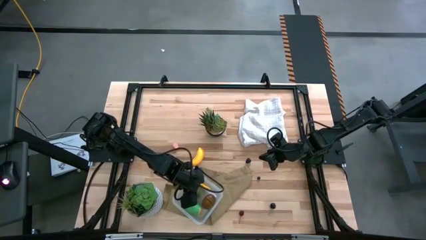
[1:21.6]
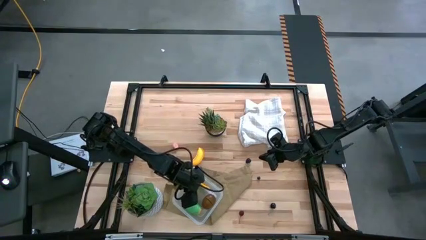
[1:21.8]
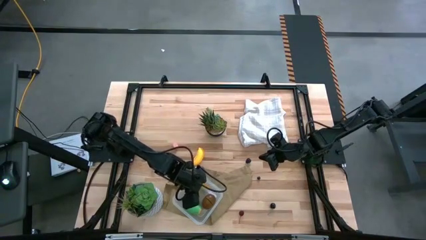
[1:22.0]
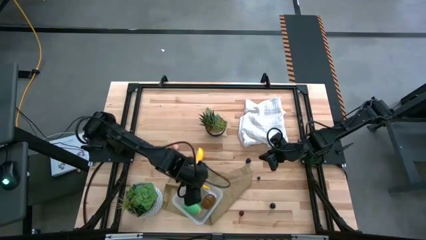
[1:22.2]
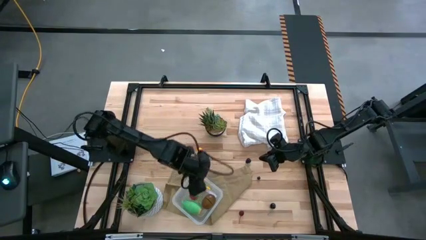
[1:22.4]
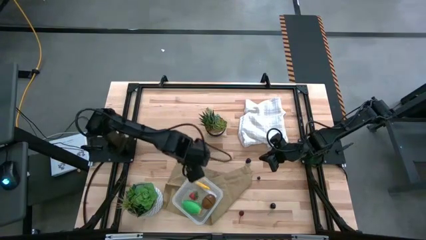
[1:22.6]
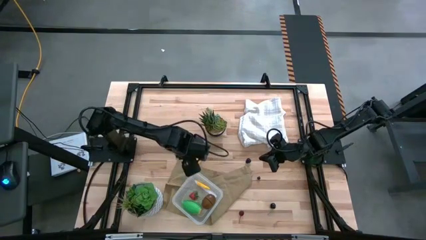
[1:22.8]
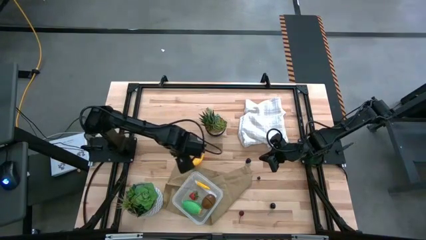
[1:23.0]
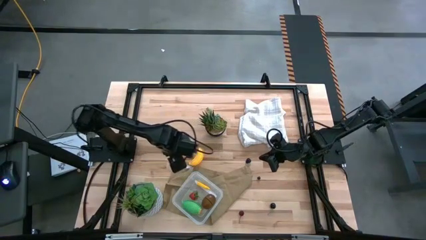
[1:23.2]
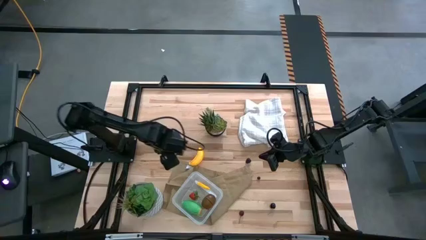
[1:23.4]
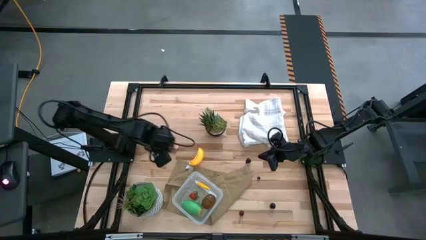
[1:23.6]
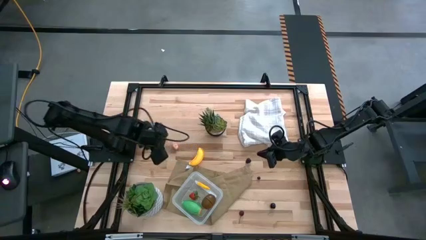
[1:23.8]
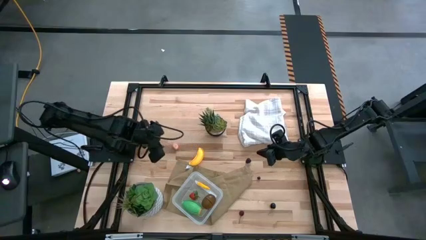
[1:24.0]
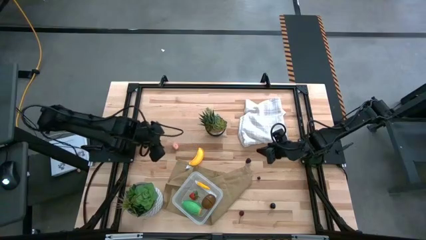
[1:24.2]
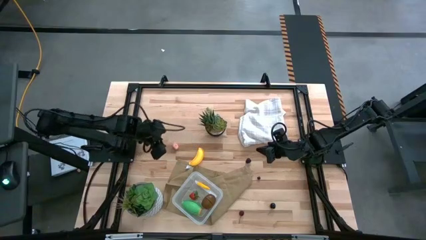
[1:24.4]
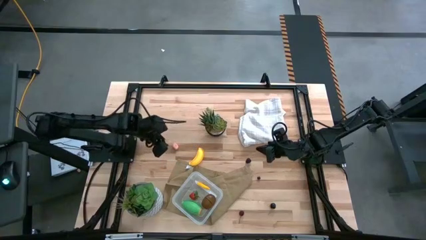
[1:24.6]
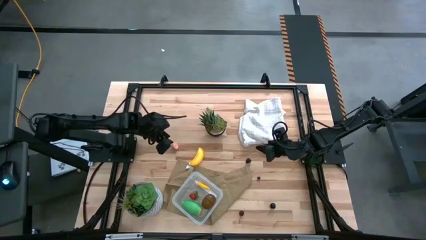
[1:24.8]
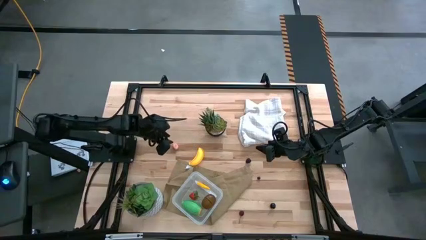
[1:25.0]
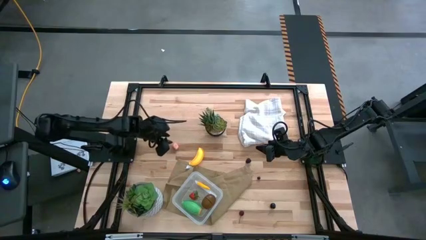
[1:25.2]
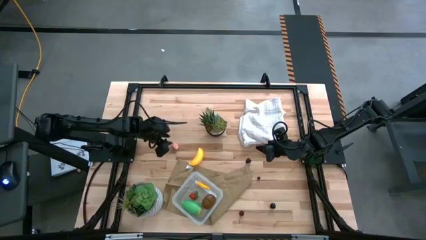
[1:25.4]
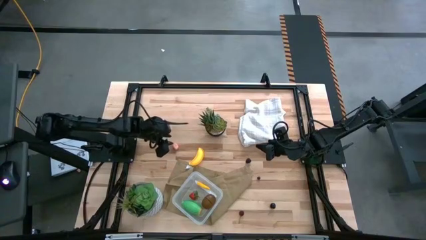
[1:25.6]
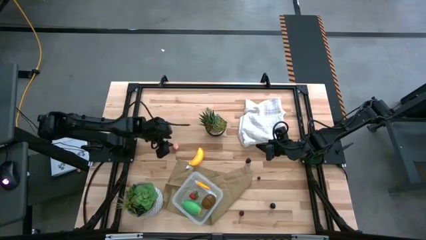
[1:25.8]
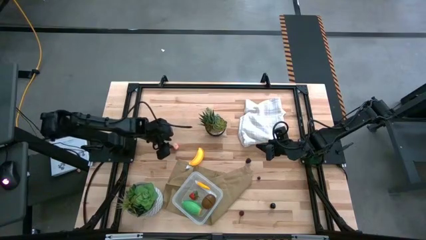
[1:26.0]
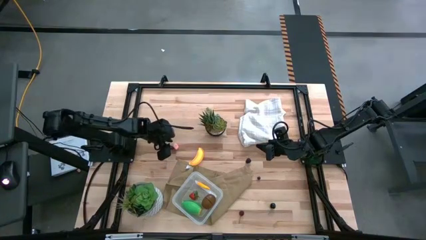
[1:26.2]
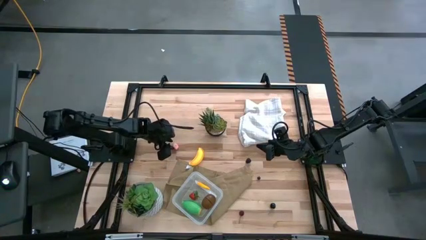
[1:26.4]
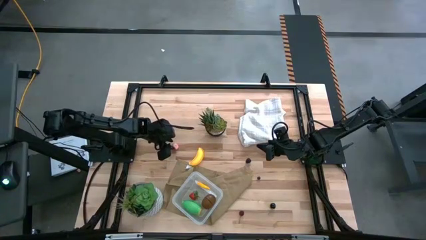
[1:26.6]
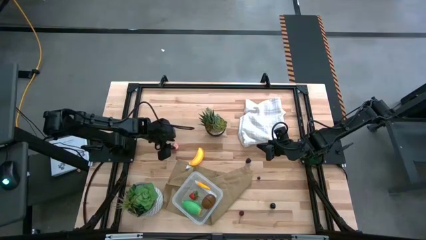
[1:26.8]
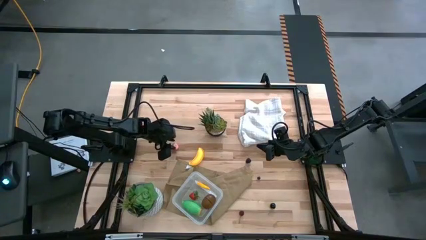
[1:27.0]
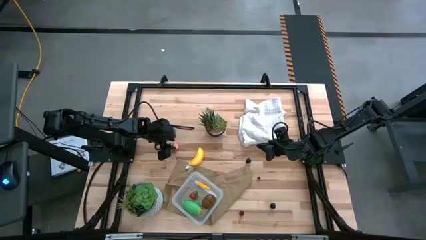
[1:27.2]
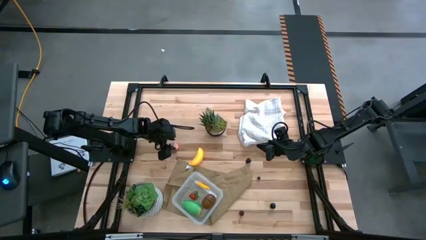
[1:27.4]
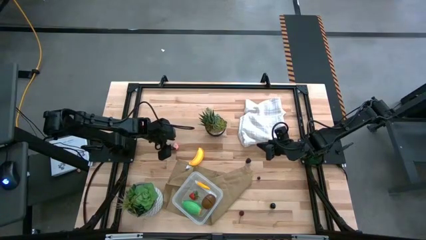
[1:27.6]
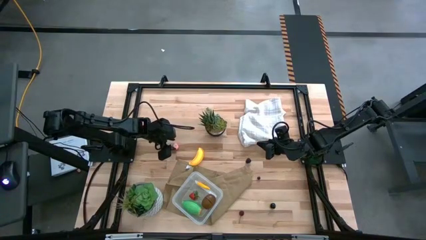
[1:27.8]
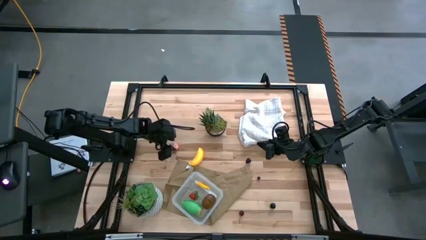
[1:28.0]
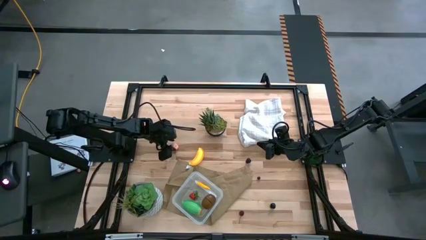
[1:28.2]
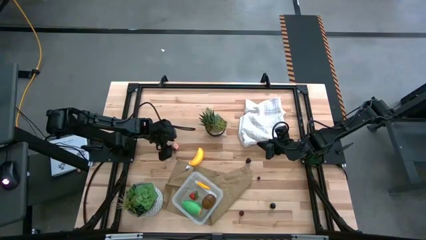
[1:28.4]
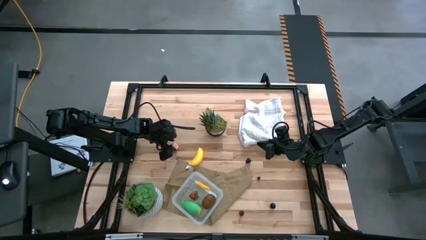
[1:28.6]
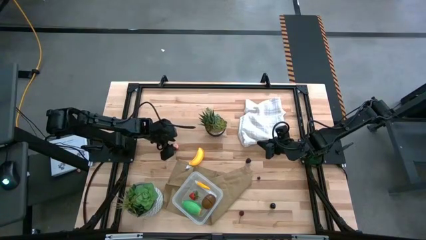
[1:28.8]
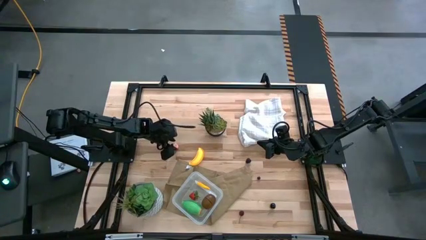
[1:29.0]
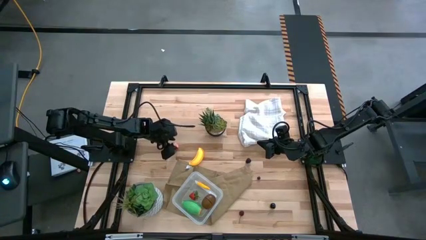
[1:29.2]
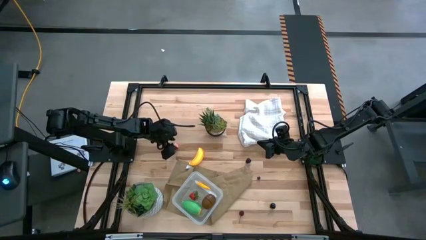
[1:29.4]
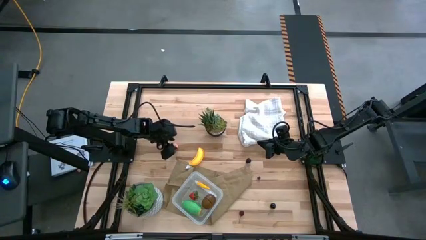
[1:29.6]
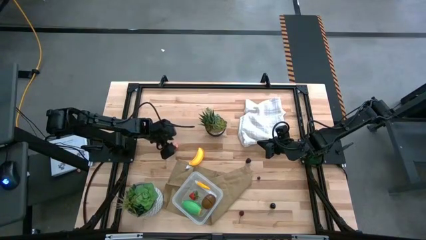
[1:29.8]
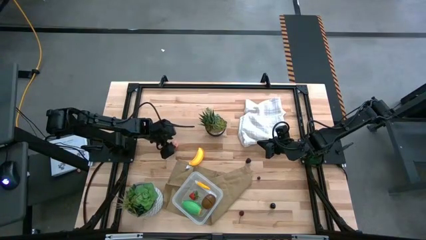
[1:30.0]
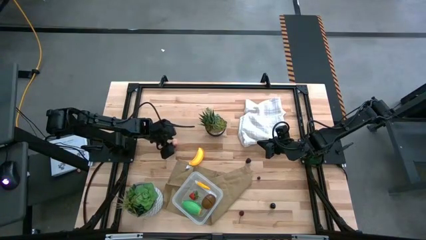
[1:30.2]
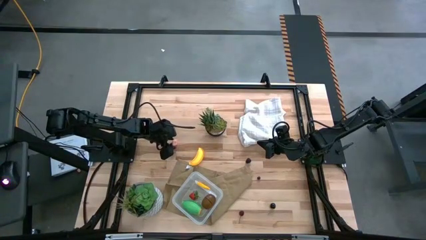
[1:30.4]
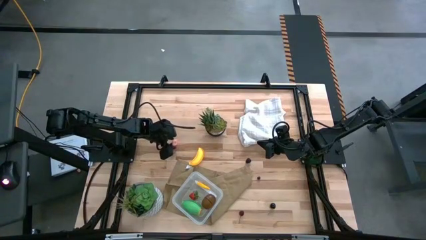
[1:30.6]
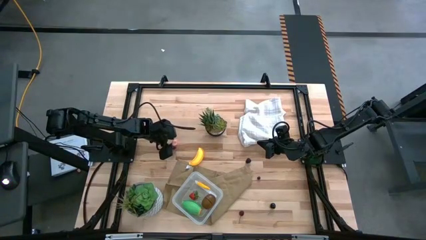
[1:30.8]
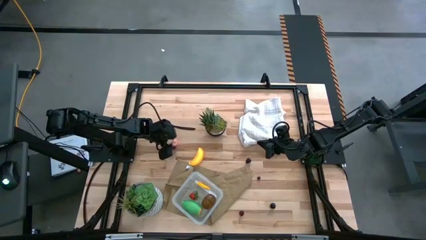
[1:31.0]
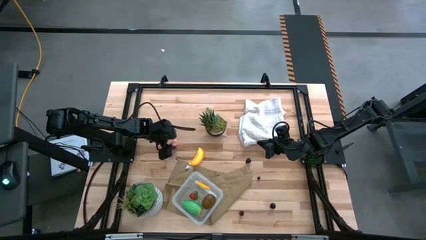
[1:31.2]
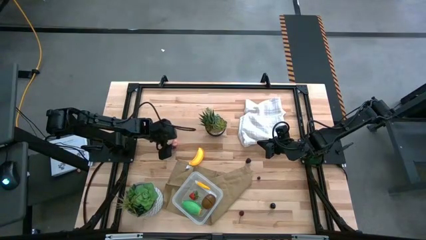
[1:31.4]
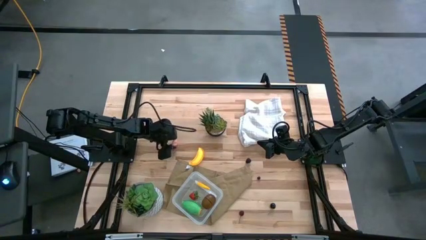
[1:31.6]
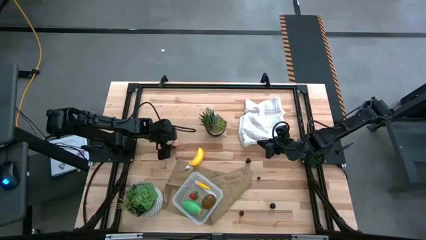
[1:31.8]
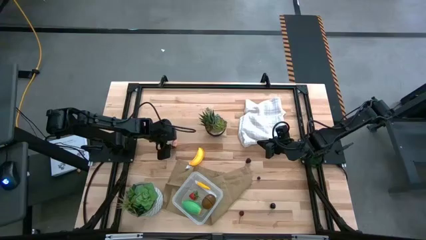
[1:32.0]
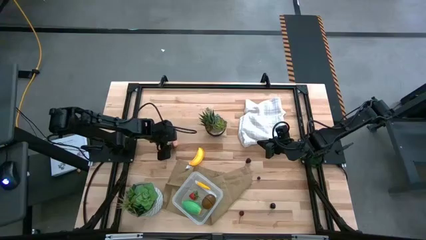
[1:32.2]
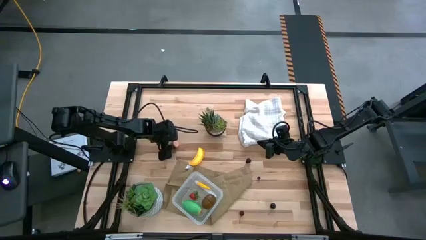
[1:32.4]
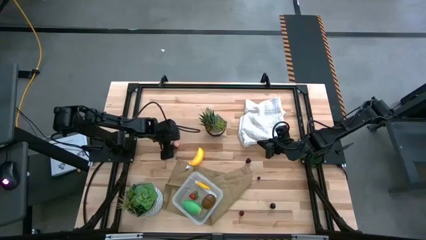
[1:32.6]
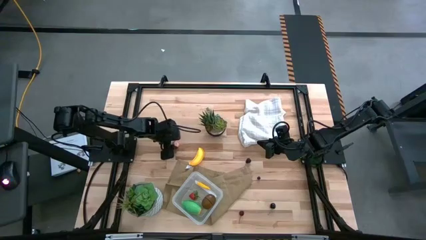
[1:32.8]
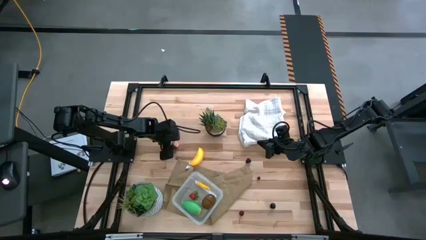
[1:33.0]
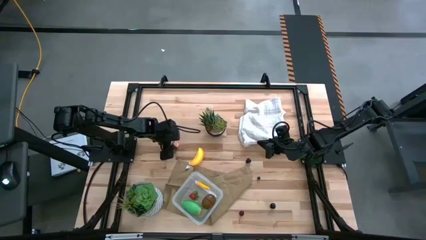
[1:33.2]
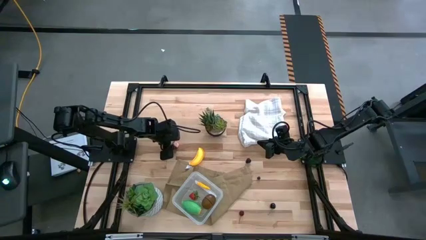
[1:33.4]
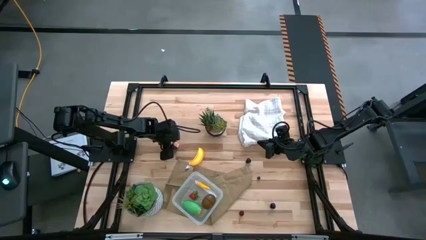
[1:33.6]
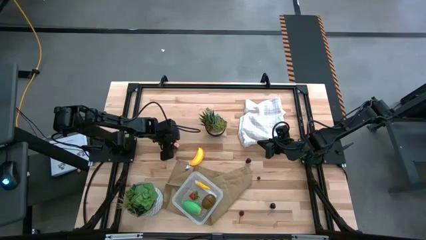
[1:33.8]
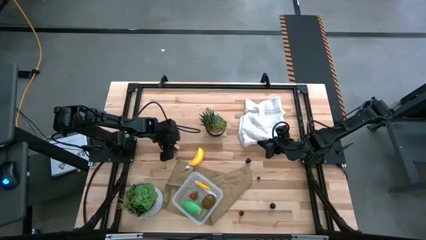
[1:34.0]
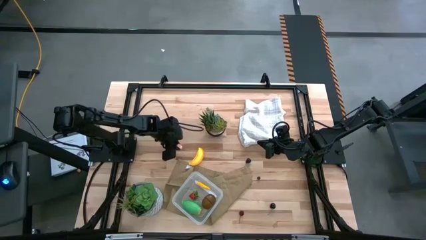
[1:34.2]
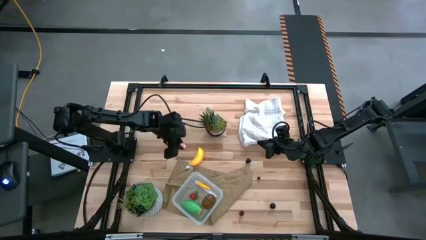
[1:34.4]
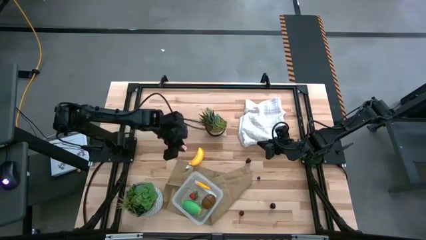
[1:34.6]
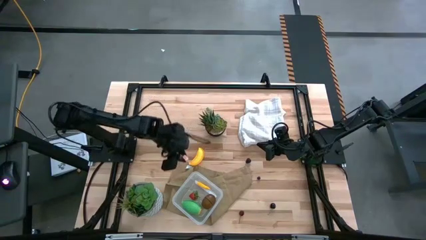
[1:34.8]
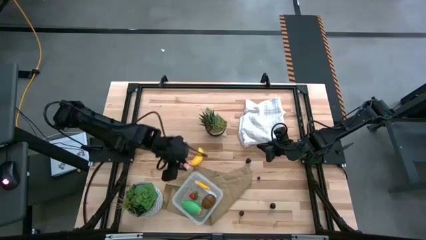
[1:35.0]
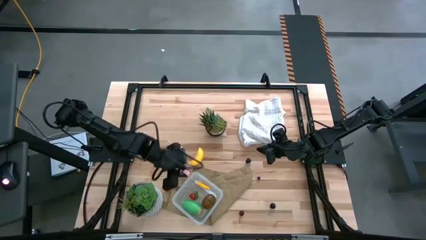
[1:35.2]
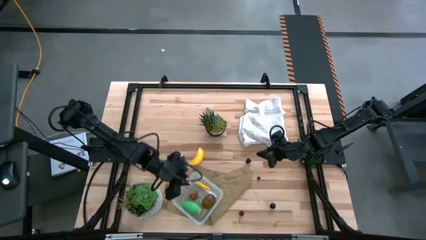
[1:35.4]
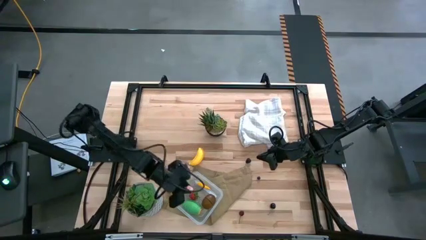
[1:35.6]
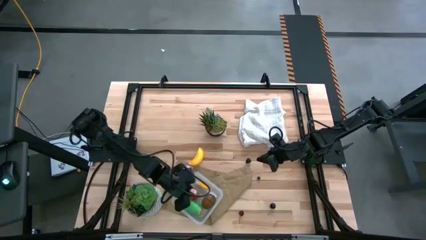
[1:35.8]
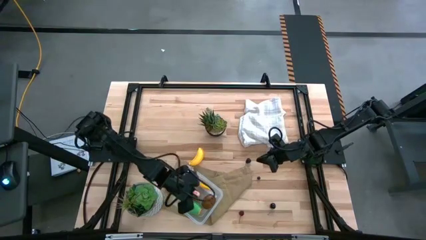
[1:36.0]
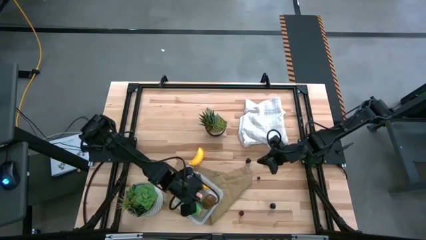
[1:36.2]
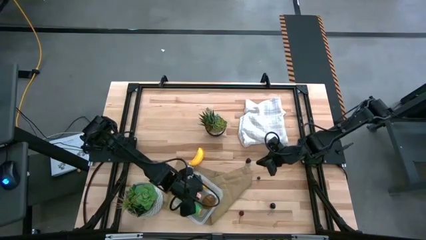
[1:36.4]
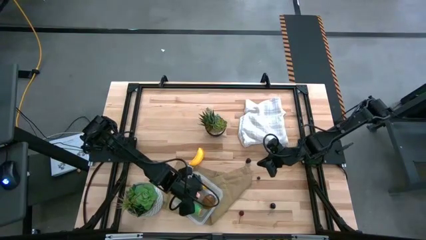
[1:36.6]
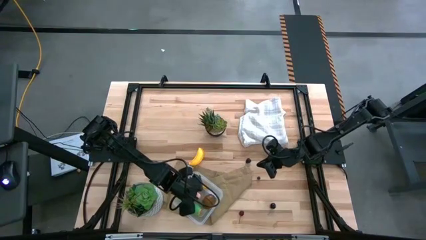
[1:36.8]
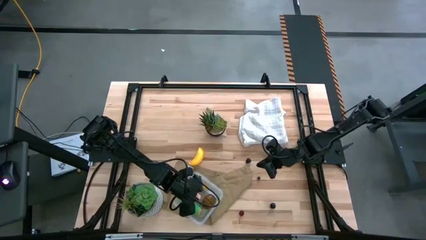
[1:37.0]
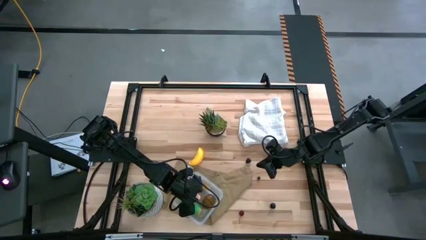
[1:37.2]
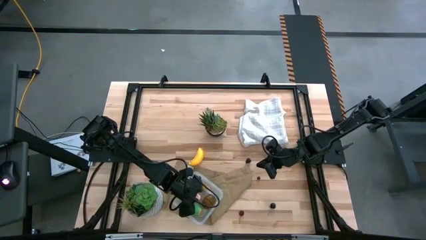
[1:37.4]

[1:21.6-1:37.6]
Task: Pick and placing Produce into tupperware
Put the peach into the container

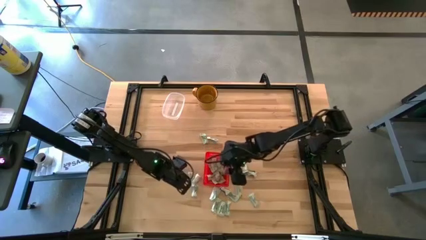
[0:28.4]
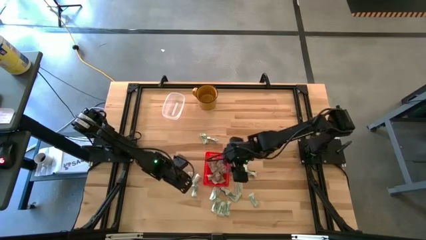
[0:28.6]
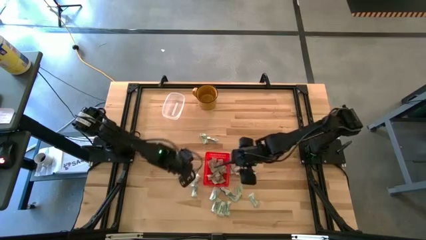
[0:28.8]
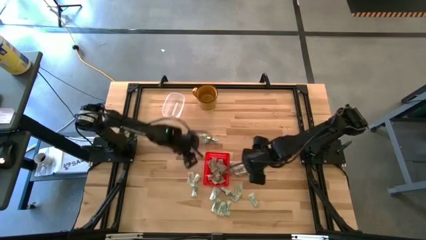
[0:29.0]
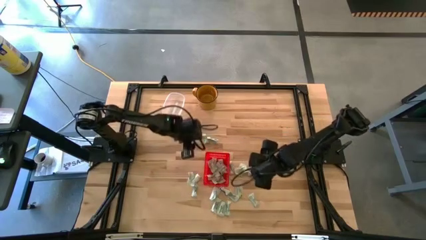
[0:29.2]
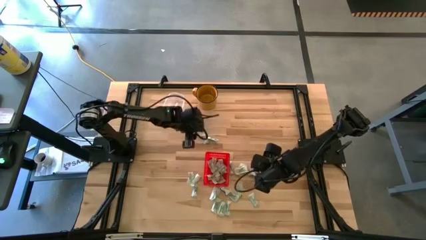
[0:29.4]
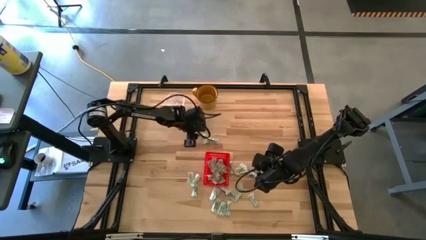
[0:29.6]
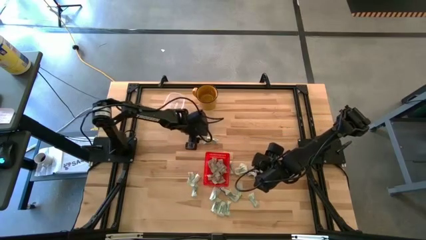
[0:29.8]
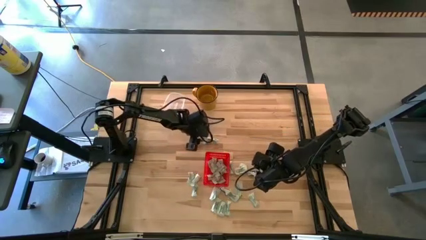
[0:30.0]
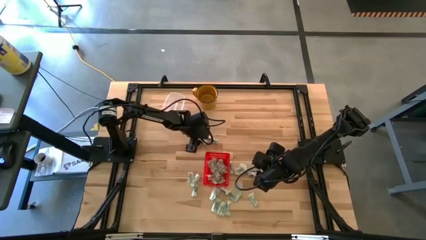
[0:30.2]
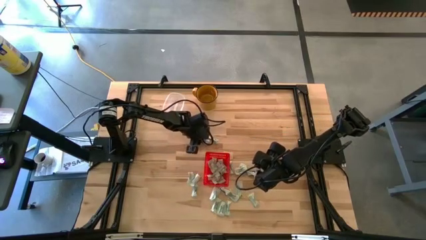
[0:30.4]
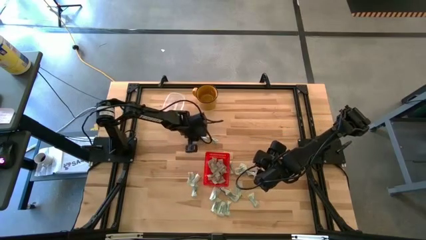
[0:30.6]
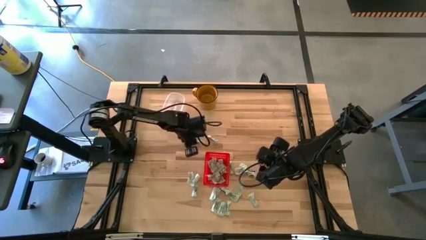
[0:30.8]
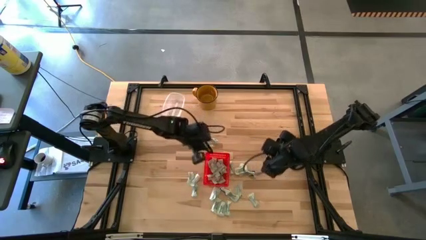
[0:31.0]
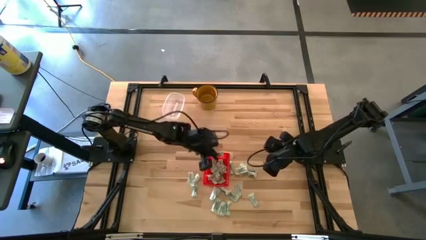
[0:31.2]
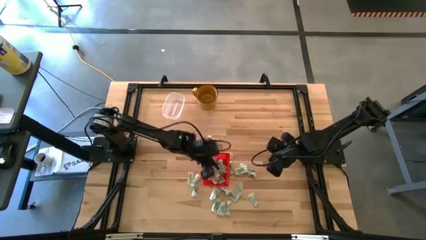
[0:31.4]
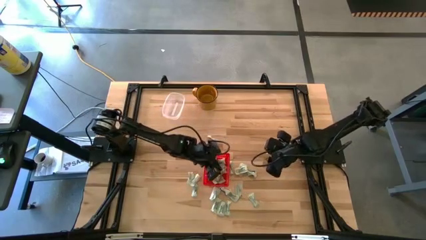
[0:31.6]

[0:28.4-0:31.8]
Task: Pick and place Stevia / Truvia into bins
Put the white stevia packet into the red basket
